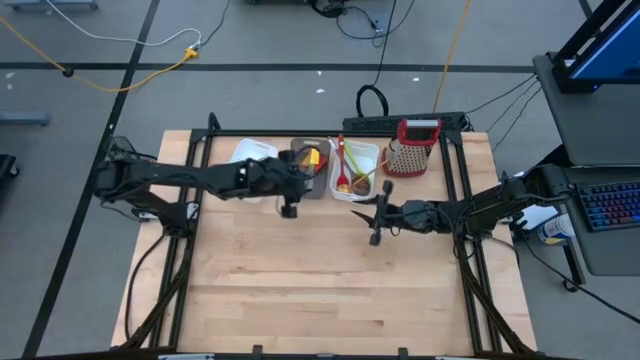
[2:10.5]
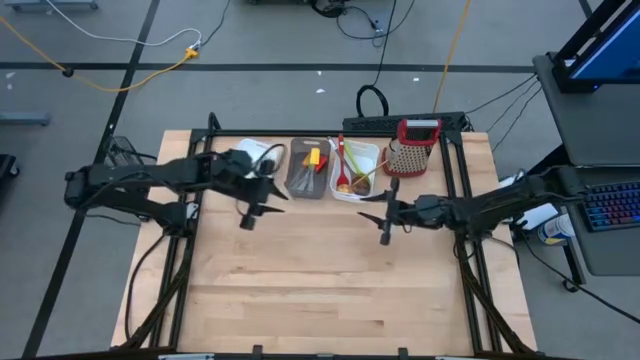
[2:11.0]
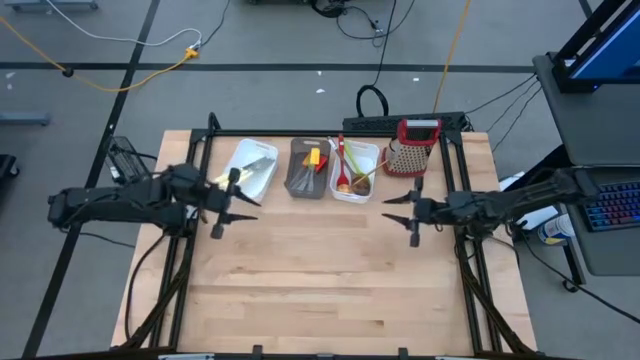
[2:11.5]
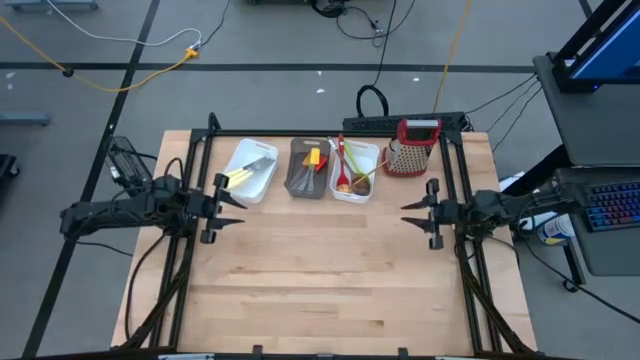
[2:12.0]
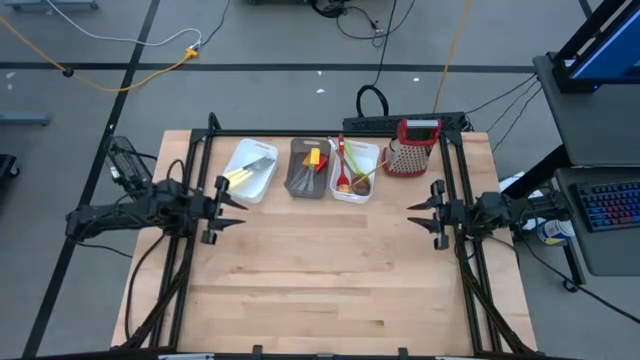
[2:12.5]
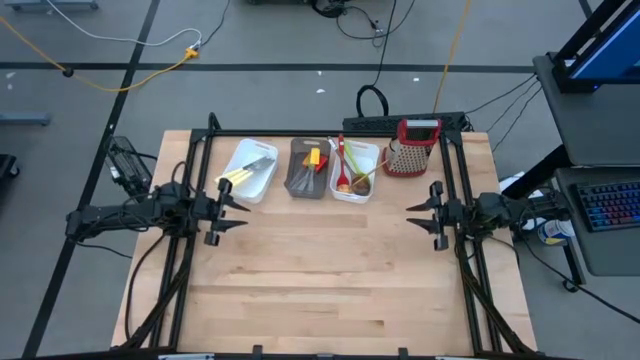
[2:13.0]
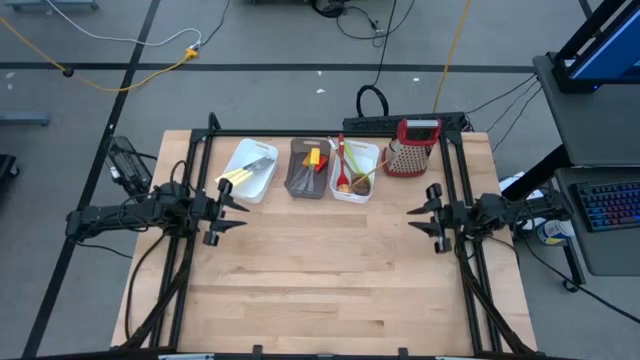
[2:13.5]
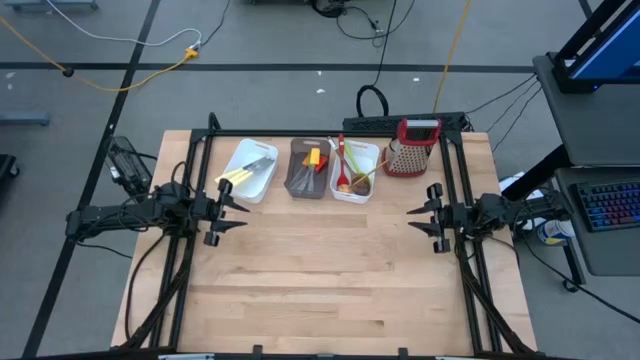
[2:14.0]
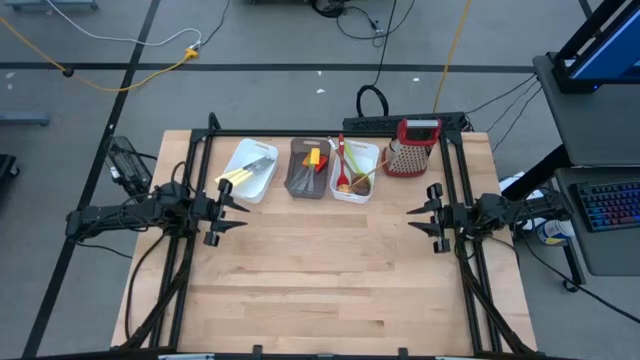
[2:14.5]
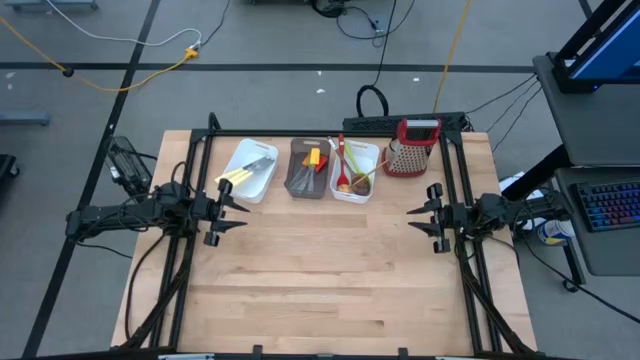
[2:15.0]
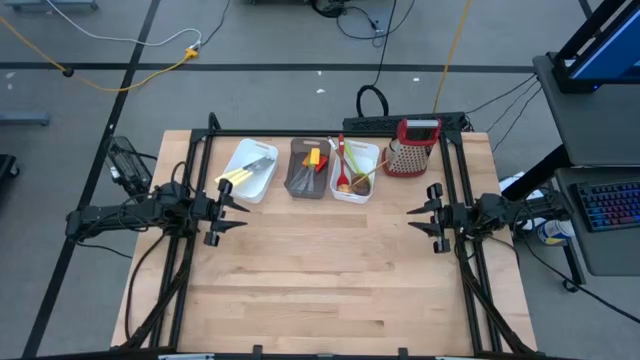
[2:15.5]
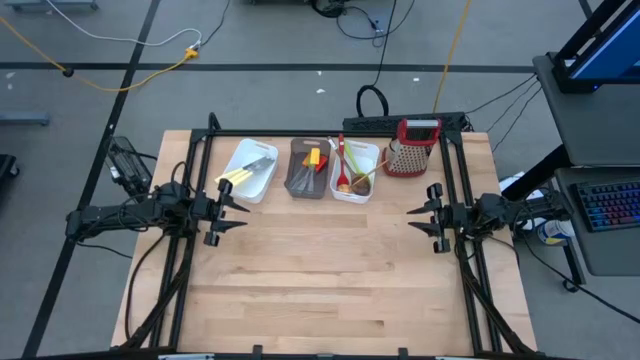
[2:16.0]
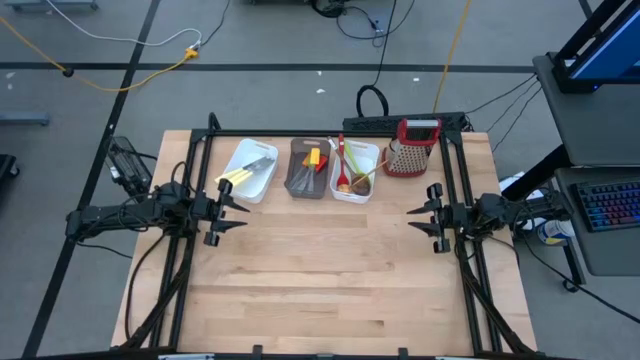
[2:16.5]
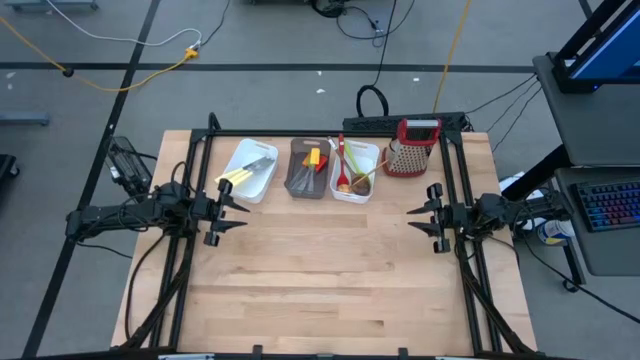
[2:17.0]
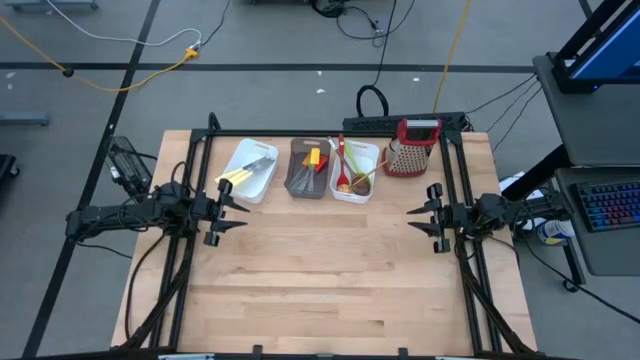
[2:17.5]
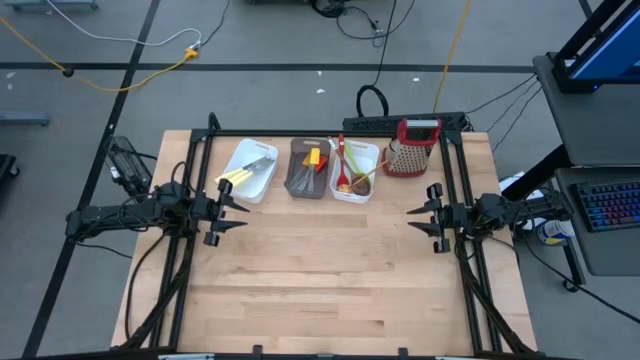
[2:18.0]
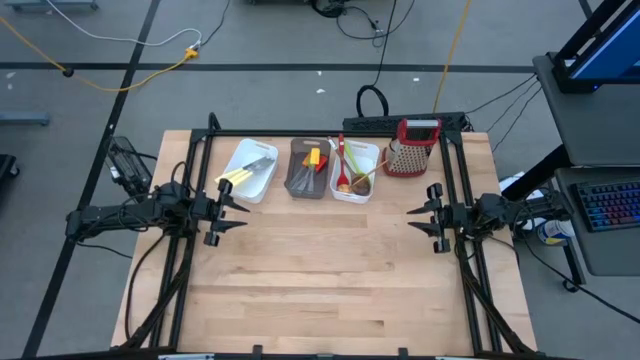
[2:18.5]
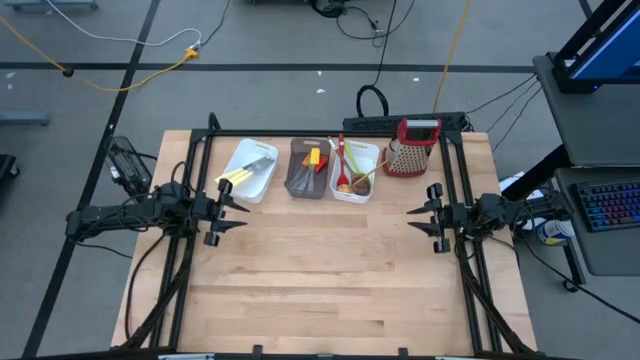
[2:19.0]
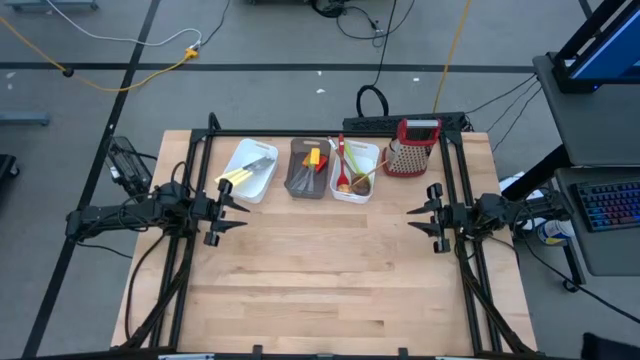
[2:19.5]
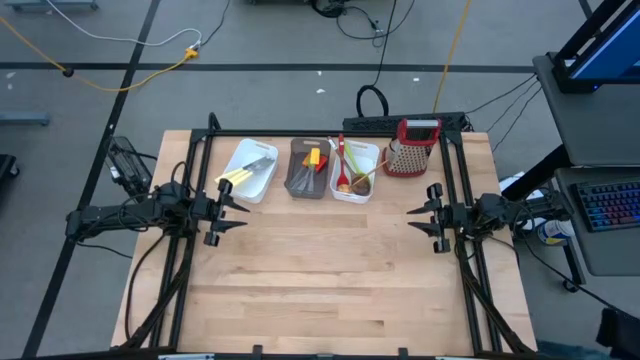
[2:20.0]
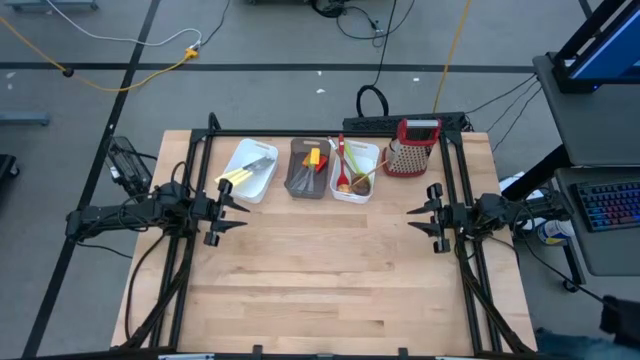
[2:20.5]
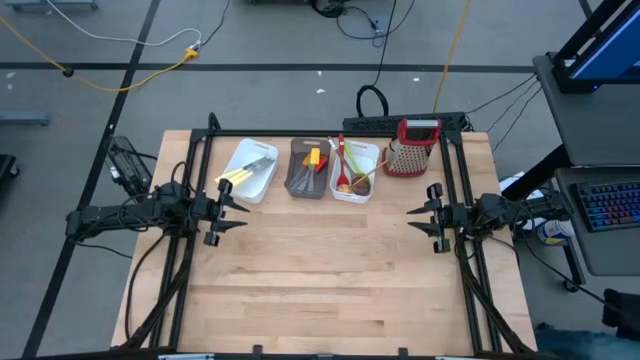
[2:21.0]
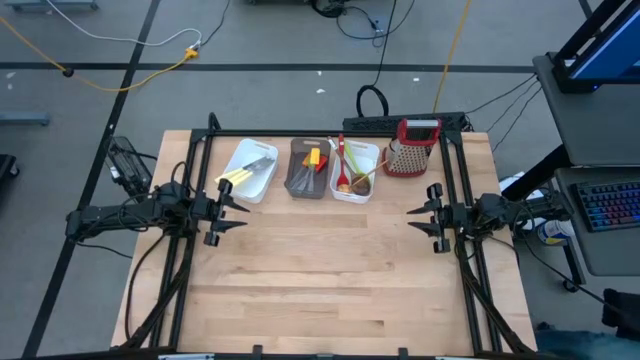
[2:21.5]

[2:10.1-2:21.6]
Task: Pick & Place Kitchen Items
Return to Home Position

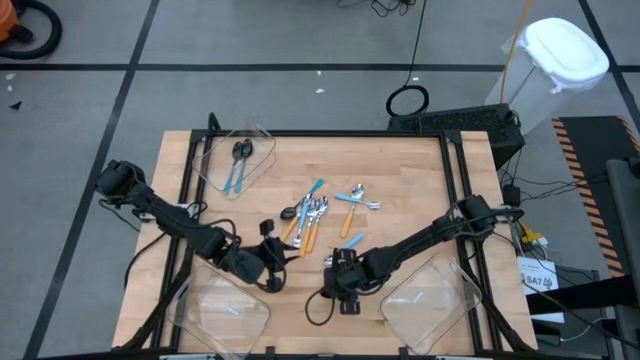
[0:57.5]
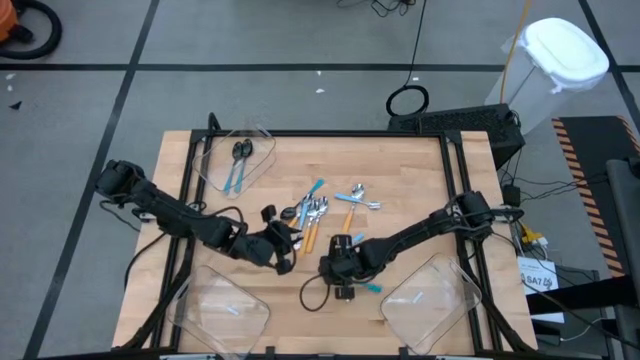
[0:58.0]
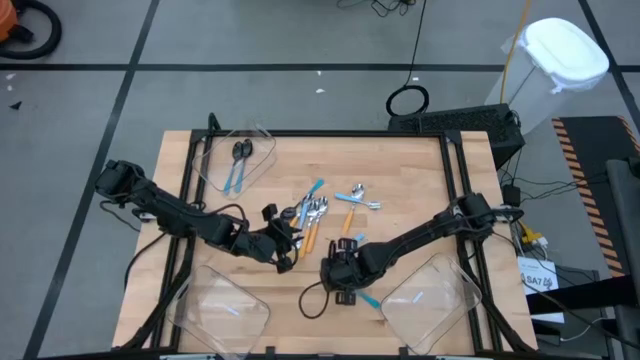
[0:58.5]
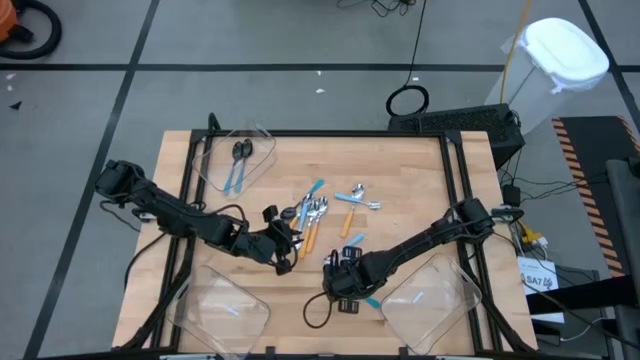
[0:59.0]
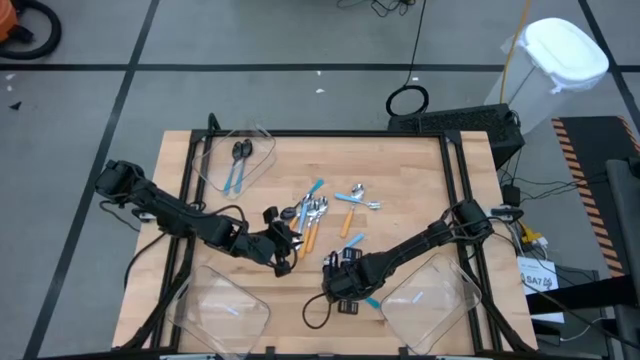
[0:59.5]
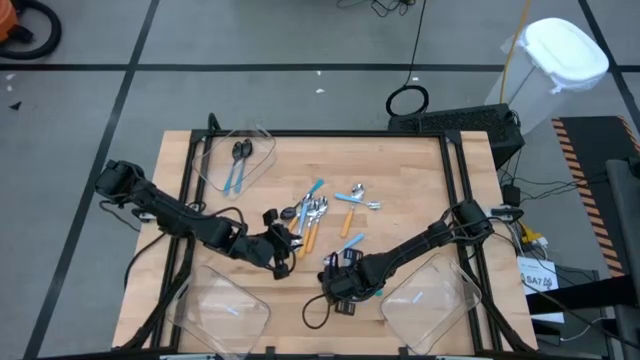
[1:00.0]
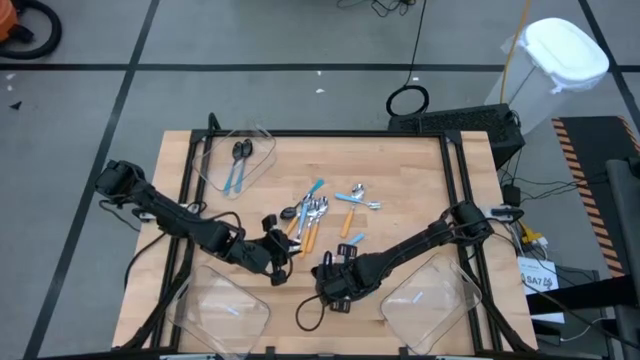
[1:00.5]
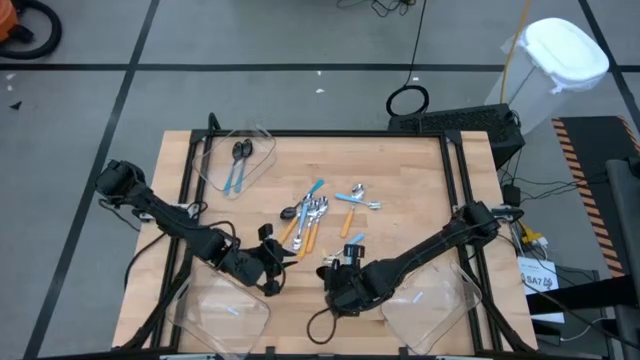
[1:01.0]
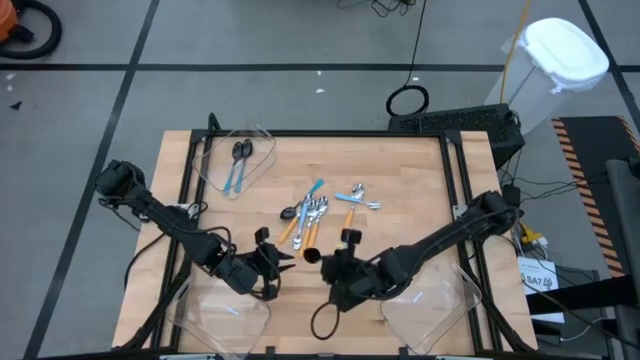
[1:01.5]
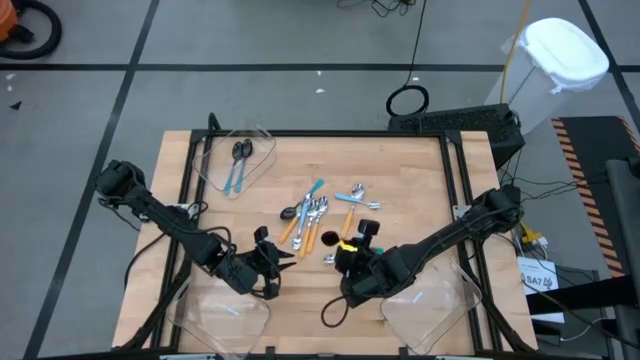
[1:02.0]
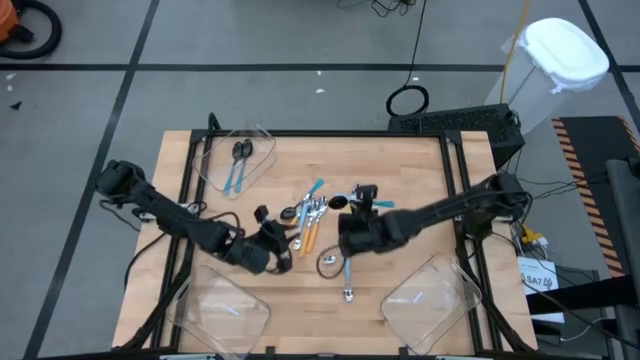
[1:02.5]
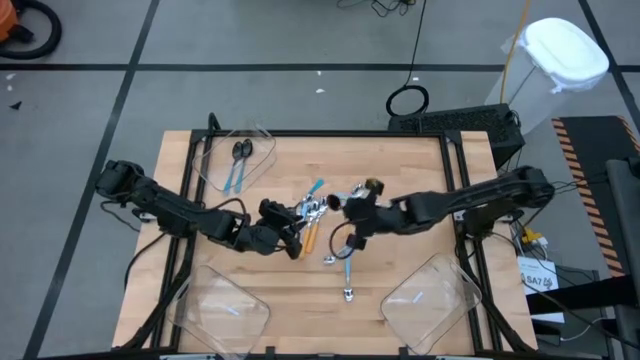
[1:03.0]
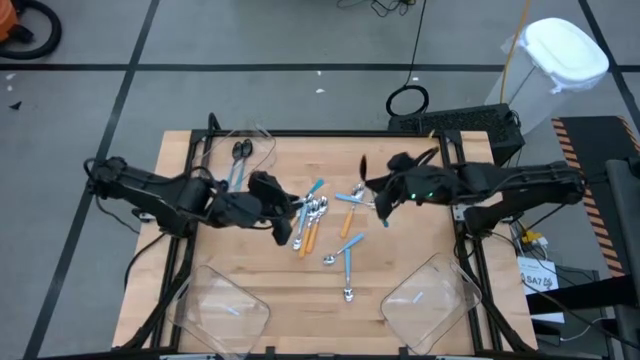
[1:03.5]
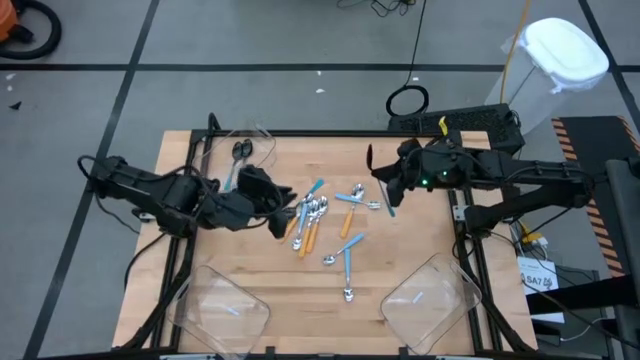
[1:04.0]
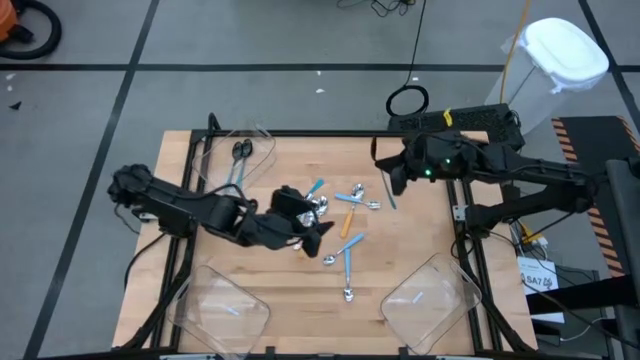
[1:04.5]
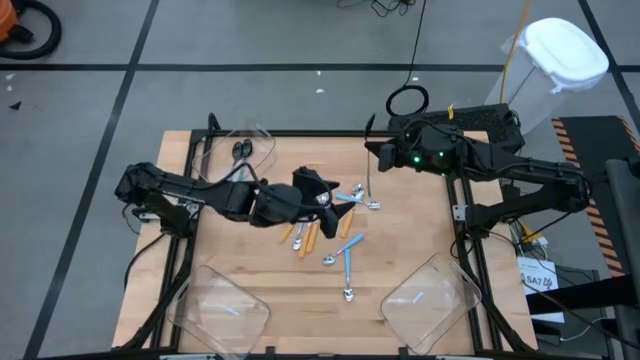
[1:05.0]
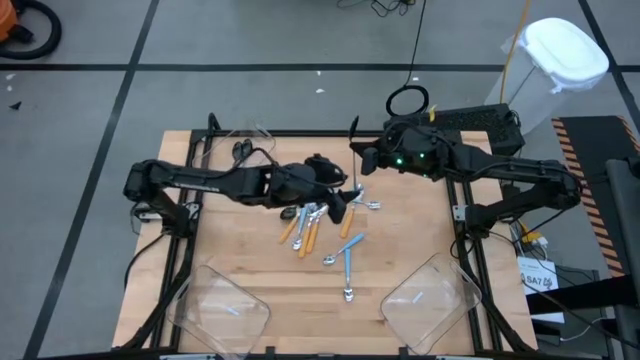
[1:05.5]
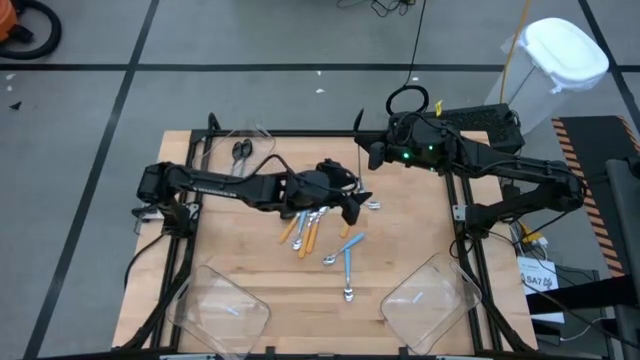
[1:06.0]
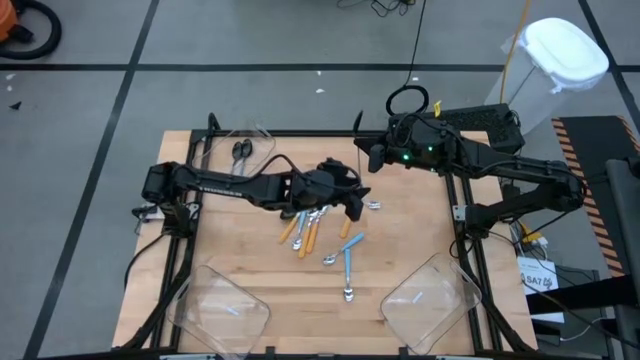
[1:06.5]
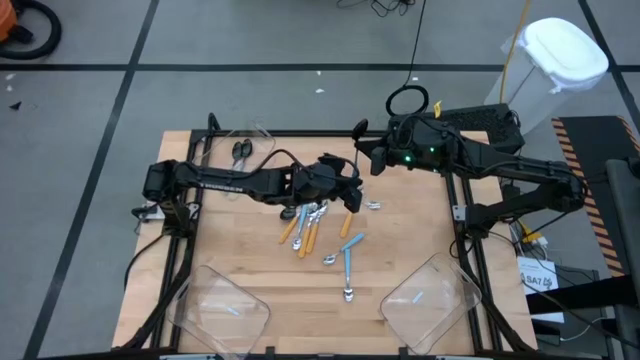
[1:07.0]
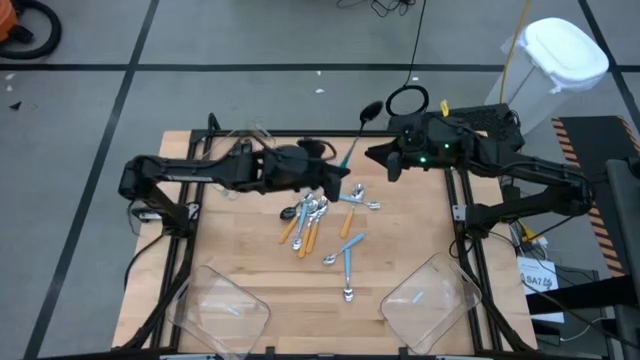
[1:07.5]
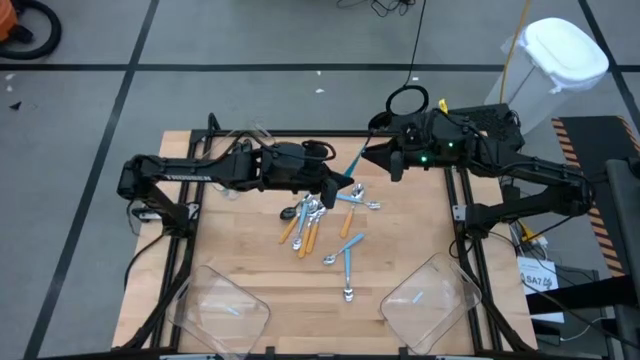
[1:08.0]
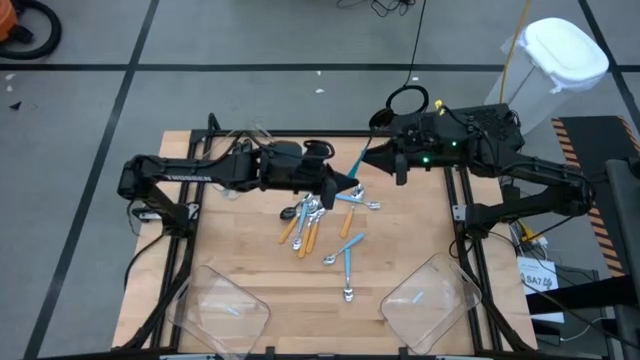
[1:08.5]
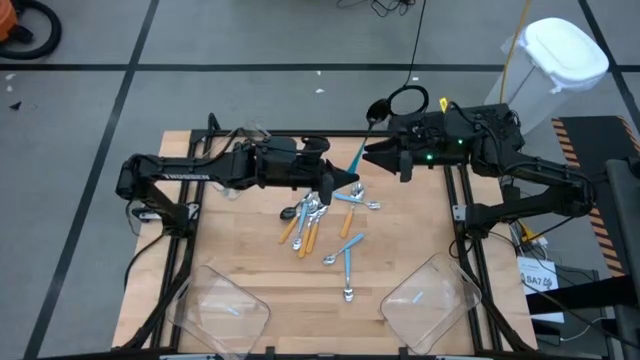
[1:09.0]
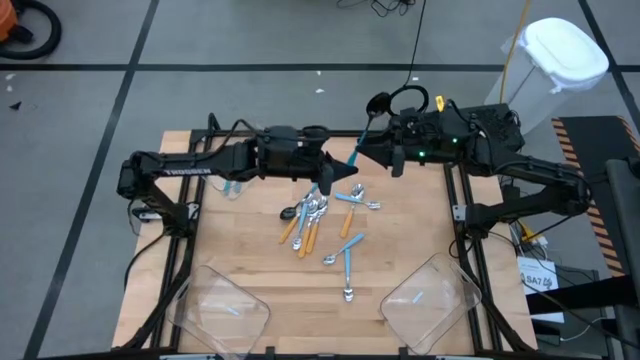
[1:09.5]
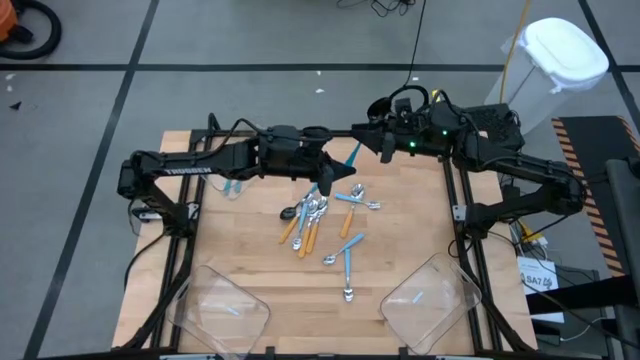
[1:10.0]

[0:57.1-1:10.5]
Task: Sort silverware by color (type)
Put the blue spoon into the top left transparent bin
